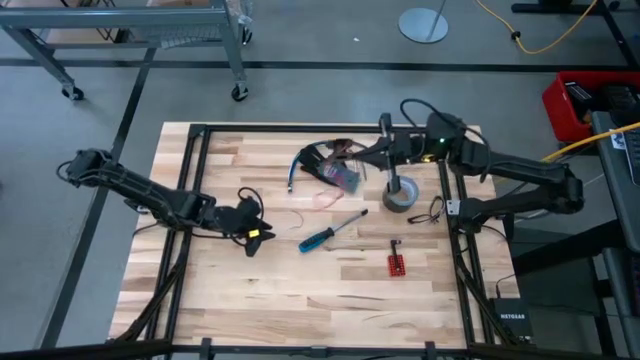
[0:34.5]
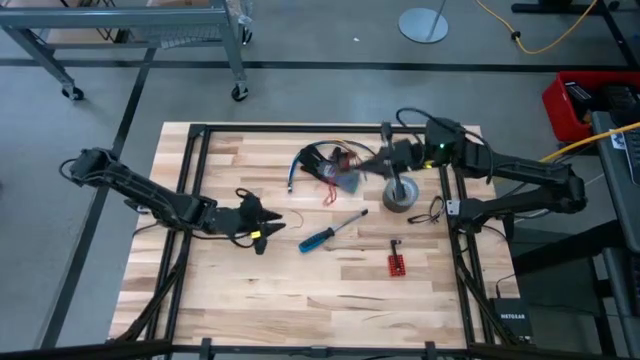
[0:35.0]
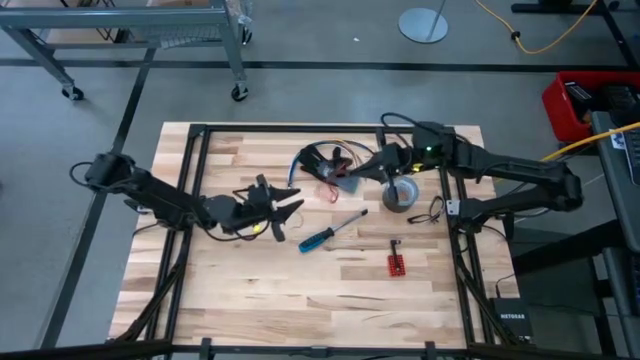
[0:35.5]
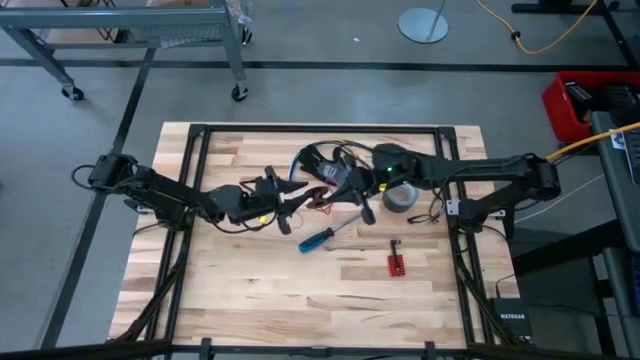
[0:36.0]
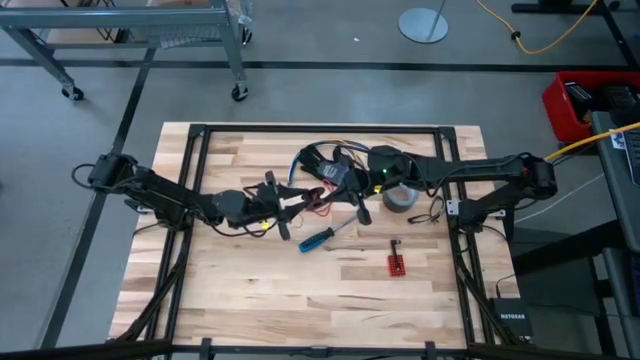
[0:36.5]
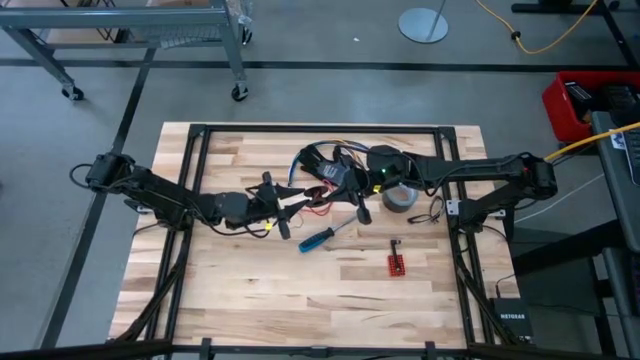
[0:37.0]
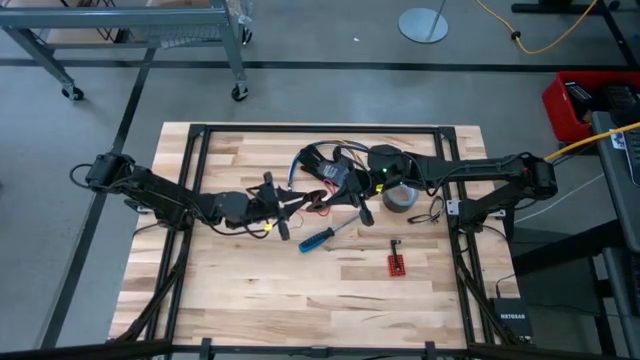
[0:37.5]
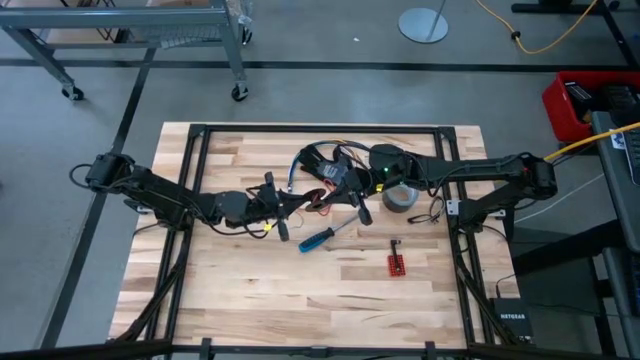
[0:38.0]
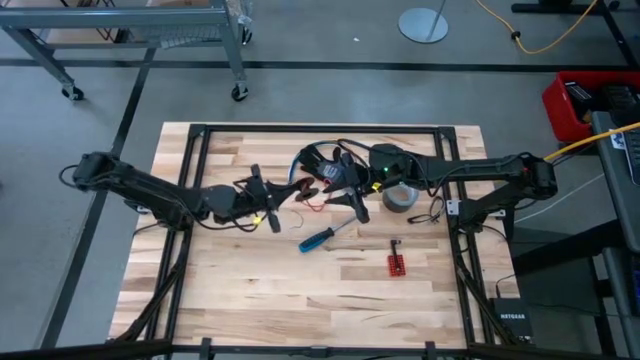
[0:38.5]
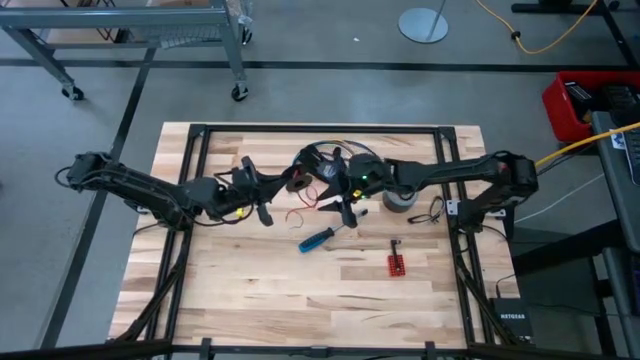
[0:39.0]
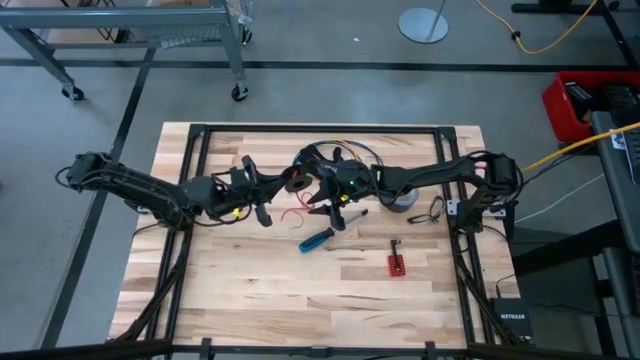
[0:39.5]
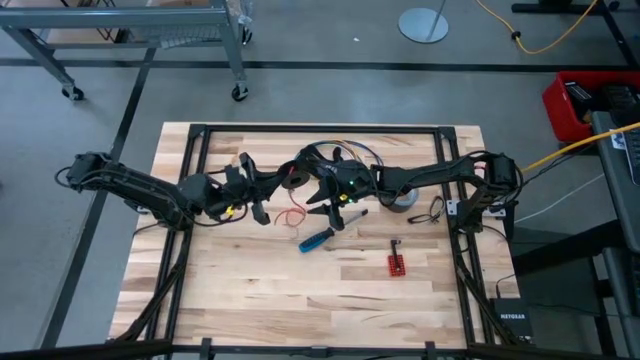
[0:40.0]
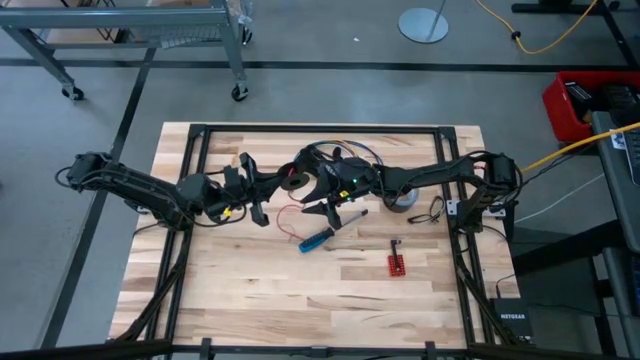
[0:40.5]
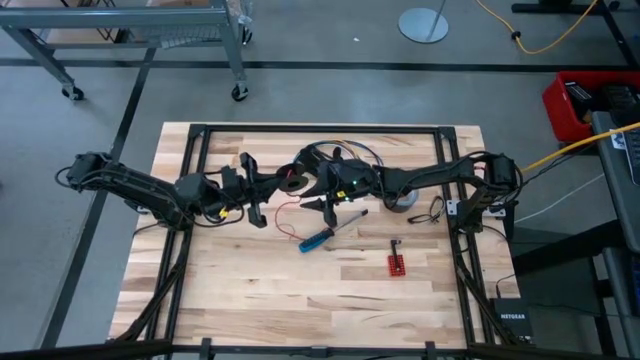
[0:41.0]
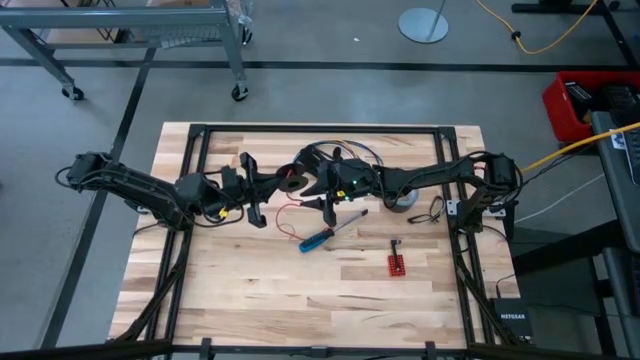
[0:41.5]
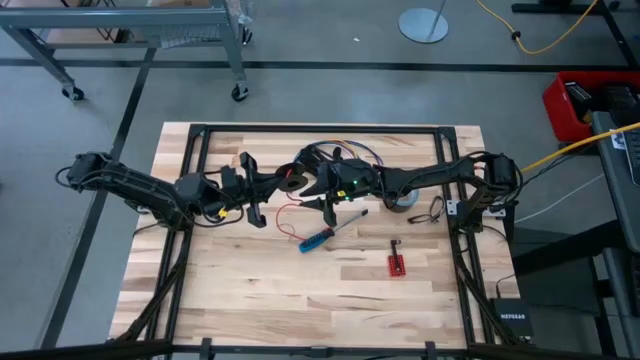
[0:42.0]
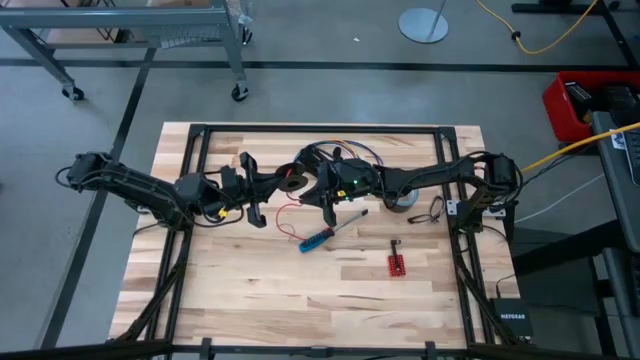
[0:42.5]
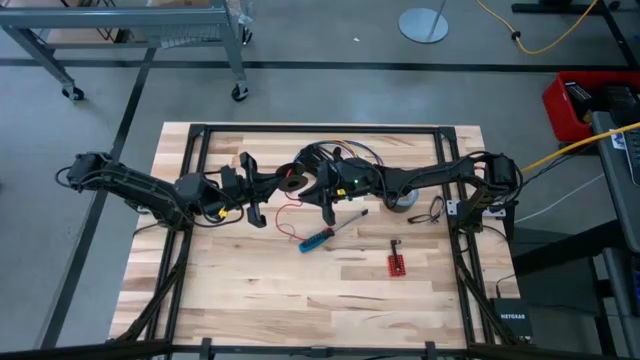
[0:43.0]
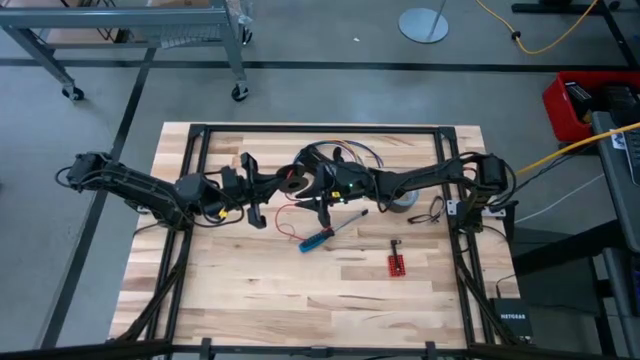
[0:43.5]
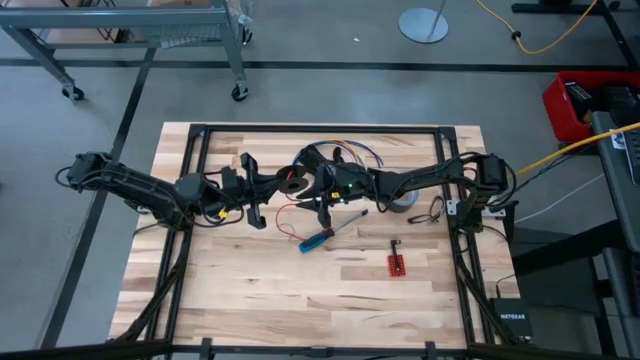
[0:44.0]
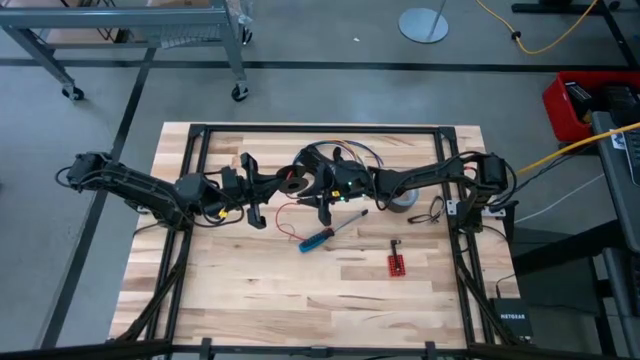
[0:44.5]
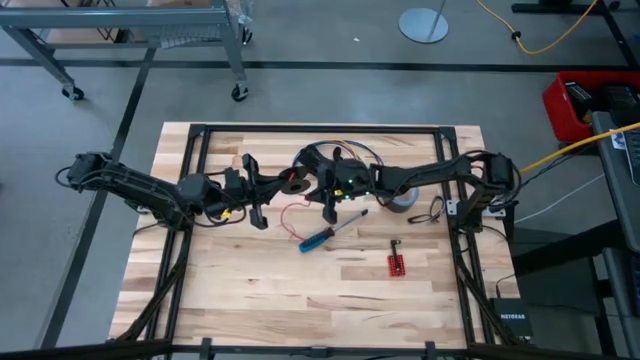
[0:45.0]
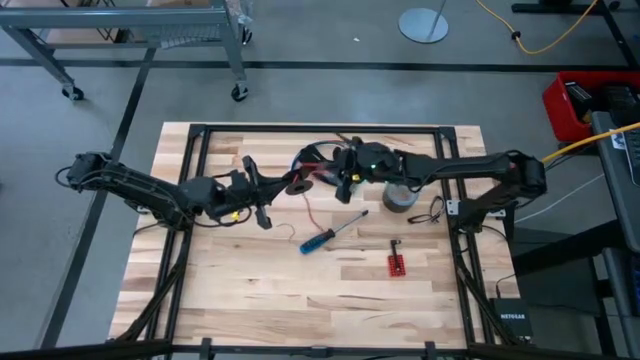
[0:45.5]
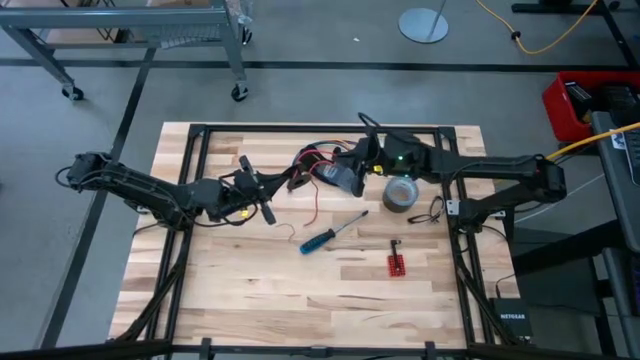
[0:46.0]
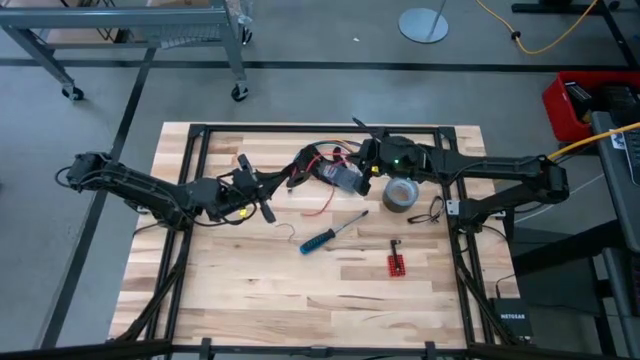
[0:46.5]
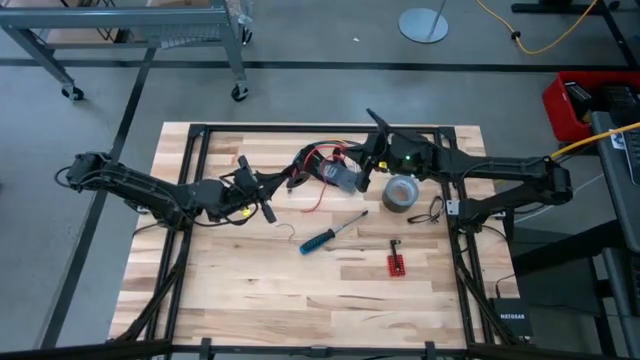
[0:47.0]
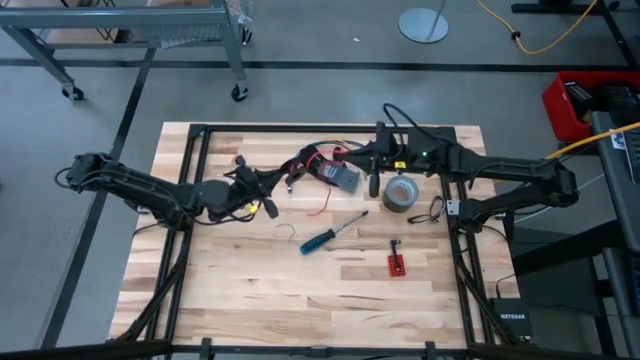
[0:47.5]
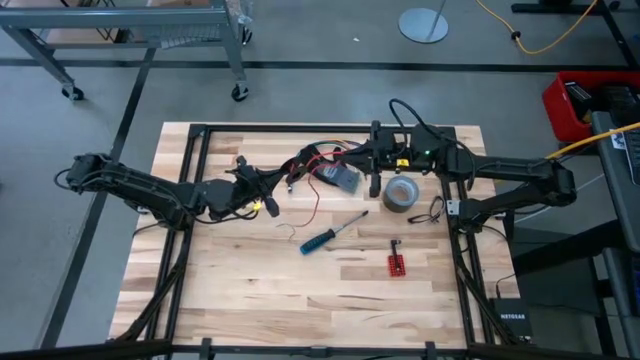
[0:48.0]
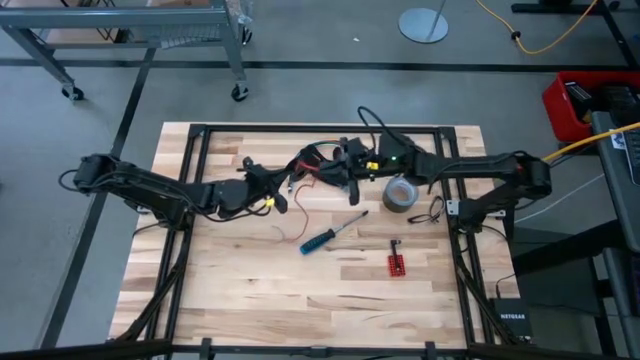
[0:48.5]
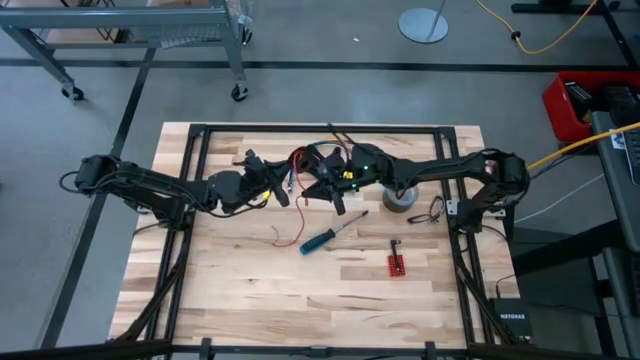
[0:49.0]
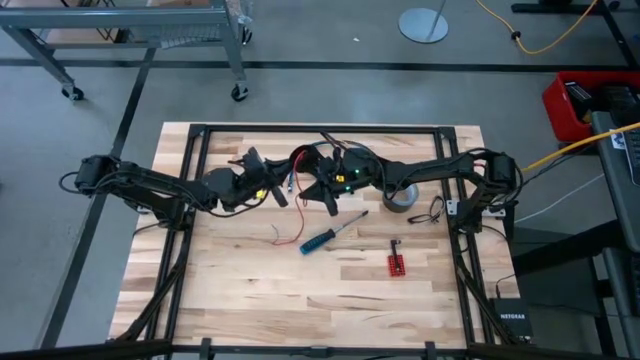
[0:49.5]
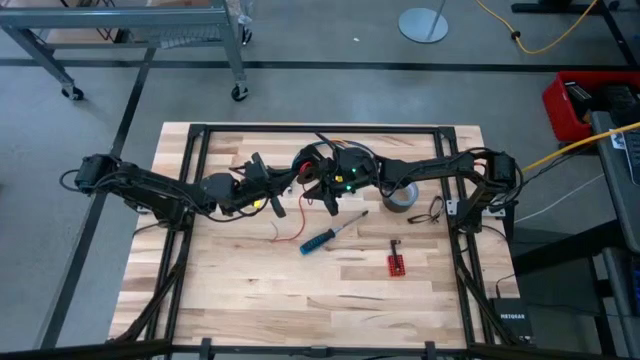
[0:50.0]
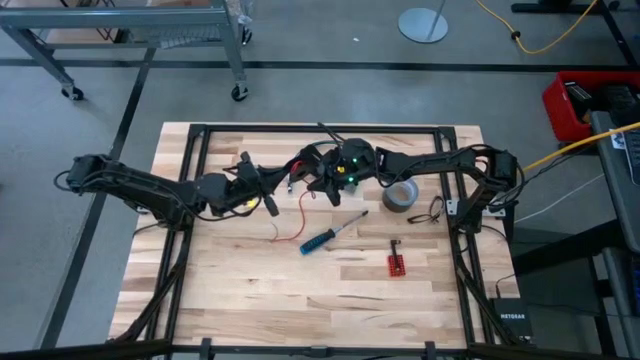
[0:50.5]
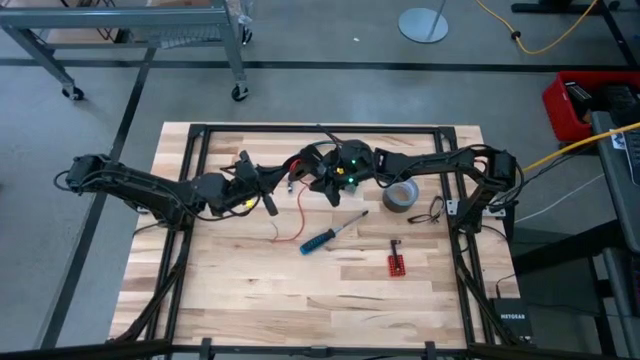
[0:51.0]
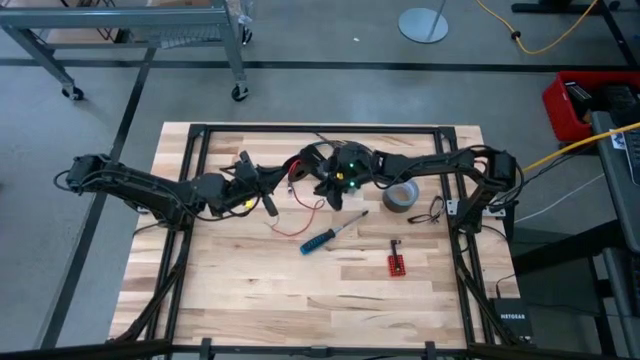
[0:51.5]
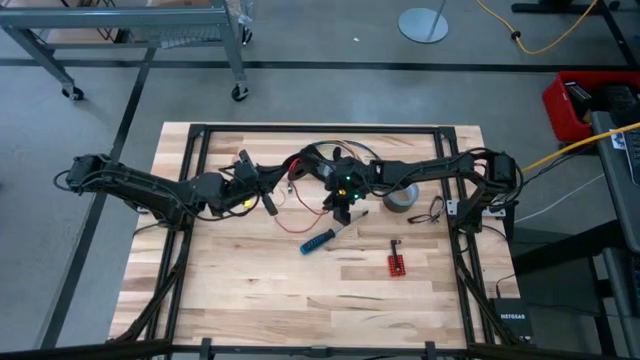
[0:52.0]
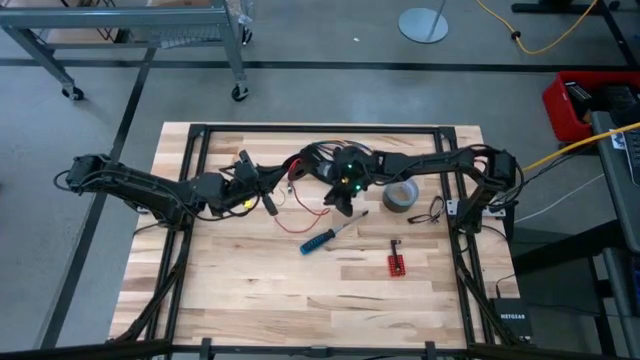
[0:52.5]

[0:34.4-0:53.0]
Task: Coil cords
Coil the red wire onto the spool

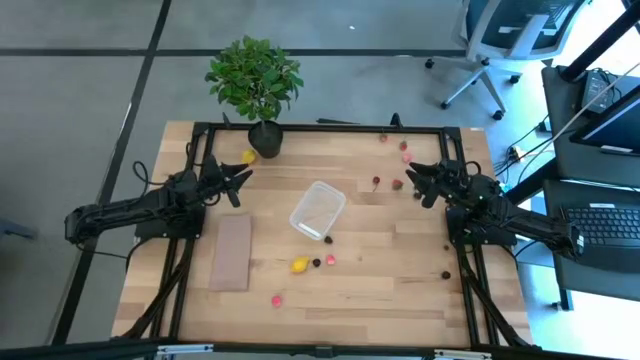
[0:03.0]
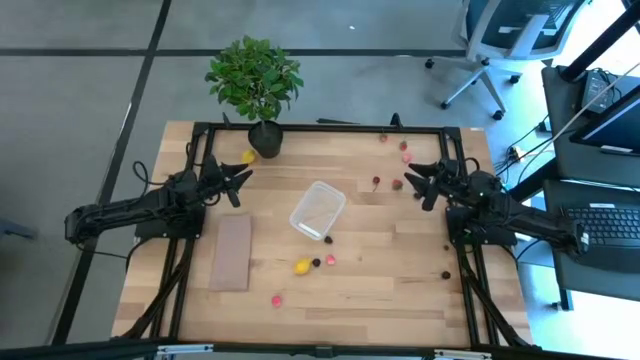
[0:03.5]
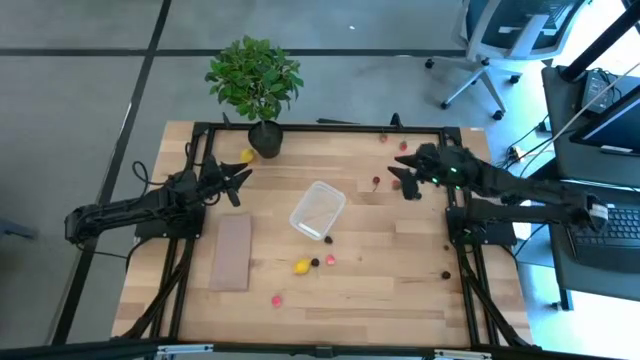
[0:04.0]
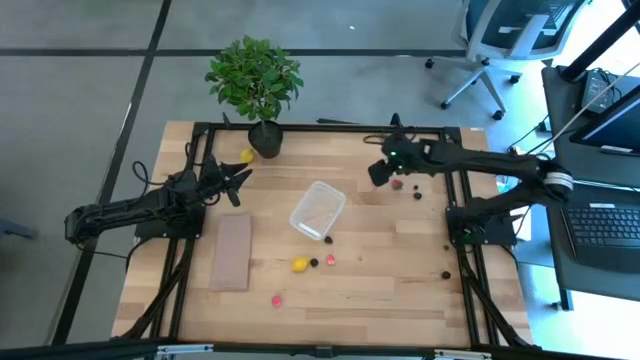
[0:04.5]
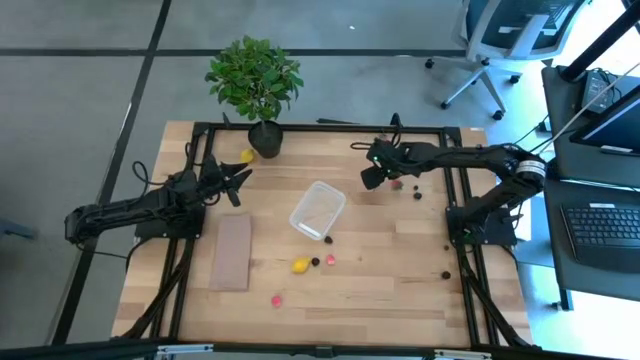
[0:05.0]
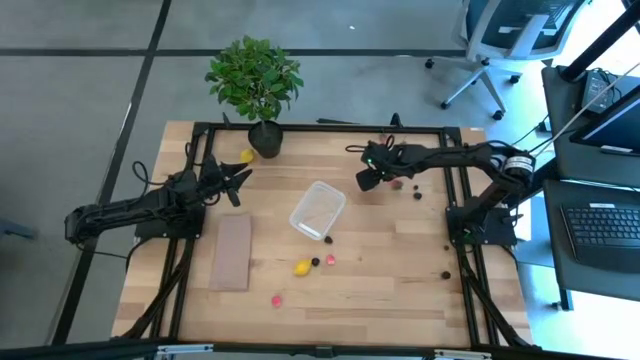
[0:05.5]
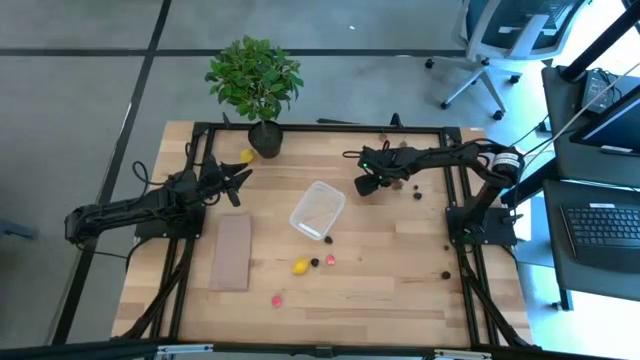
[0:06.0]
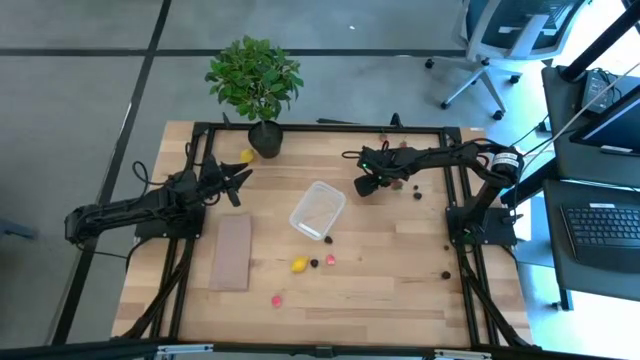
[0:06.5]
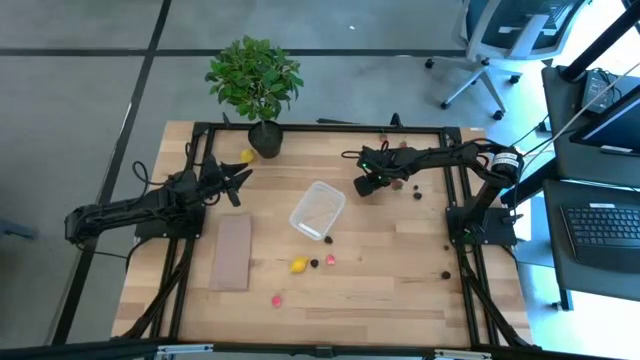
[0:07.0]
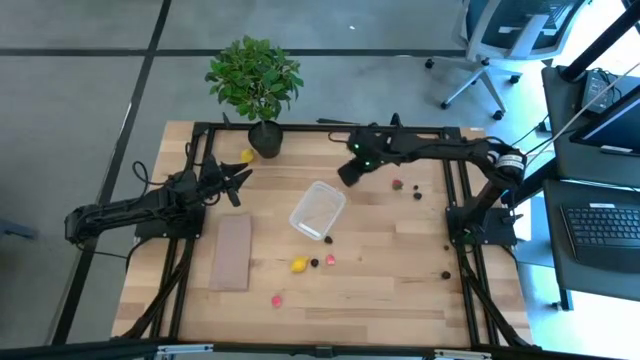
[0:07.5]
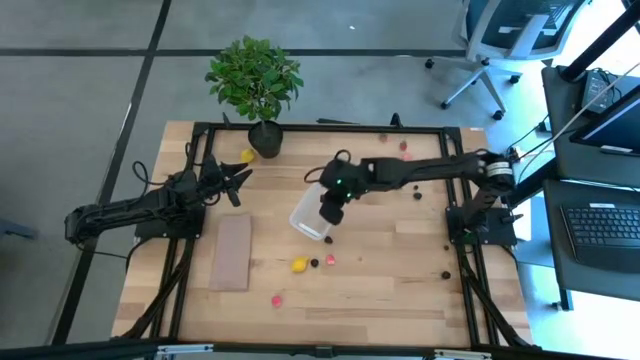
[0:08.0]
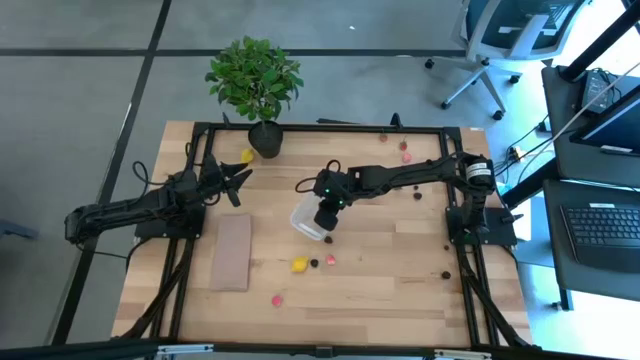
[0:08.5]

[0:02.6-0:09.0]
Task: Pick and placing Produce into tupperware
Put the red cherry into the transparent bin
